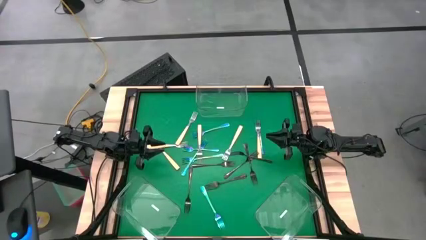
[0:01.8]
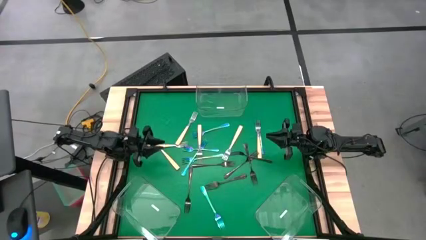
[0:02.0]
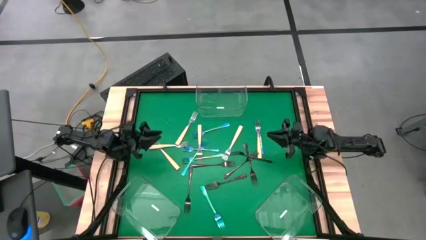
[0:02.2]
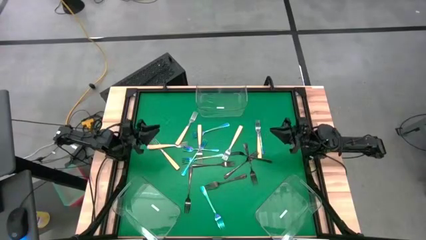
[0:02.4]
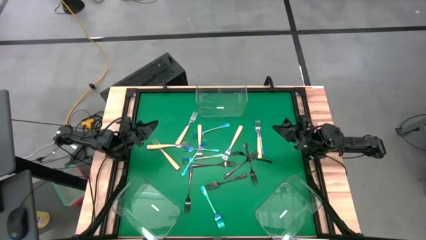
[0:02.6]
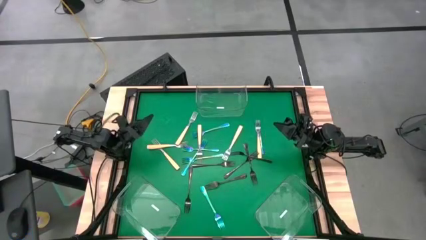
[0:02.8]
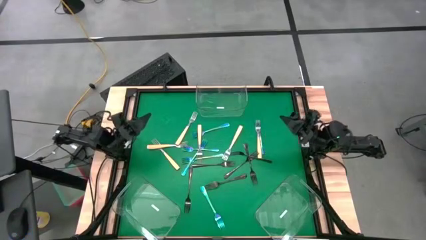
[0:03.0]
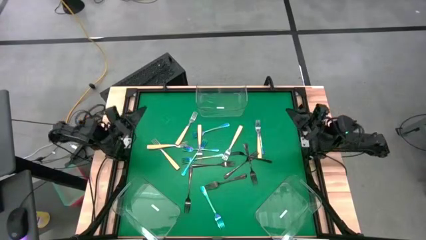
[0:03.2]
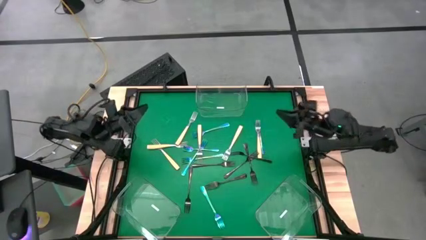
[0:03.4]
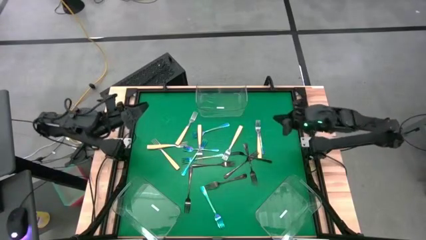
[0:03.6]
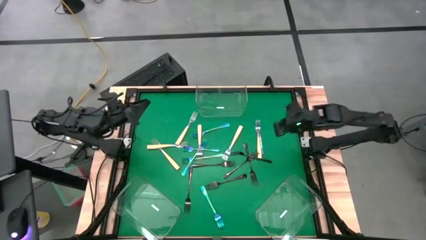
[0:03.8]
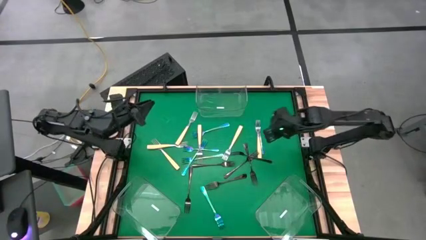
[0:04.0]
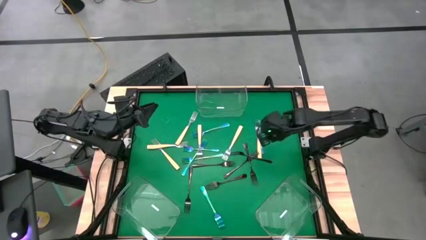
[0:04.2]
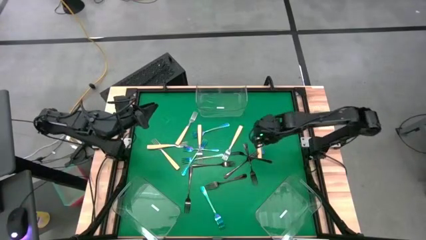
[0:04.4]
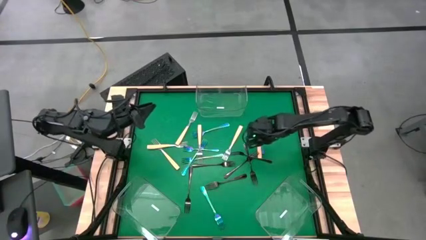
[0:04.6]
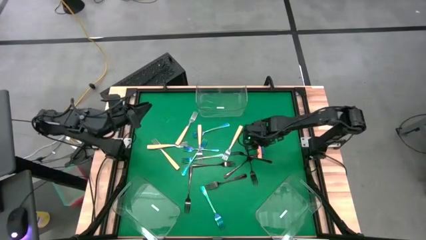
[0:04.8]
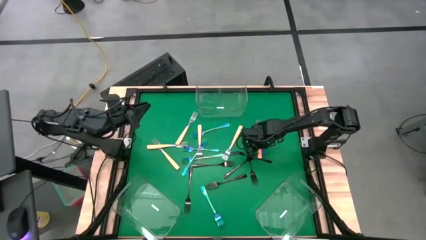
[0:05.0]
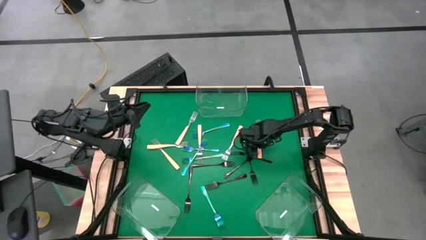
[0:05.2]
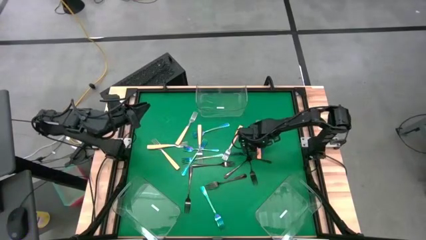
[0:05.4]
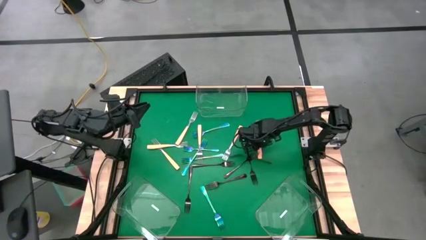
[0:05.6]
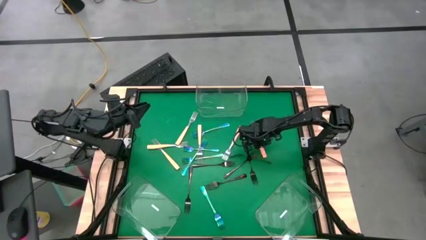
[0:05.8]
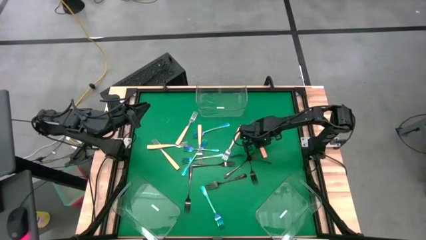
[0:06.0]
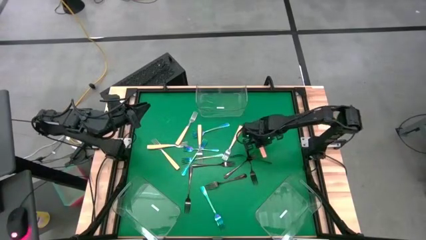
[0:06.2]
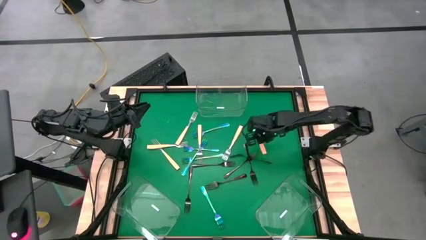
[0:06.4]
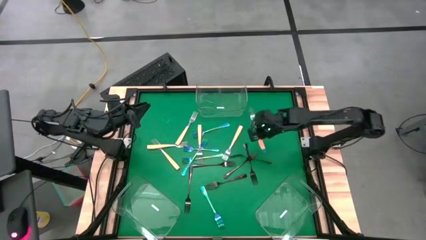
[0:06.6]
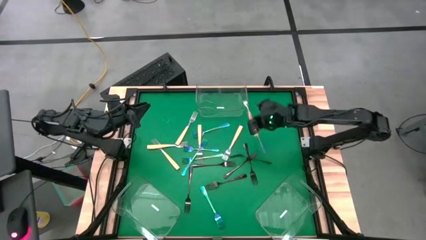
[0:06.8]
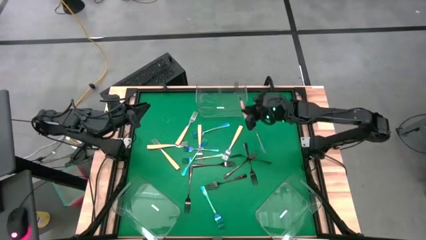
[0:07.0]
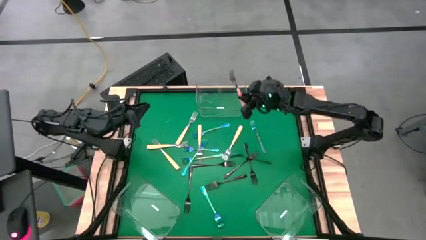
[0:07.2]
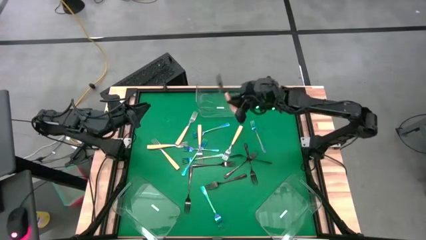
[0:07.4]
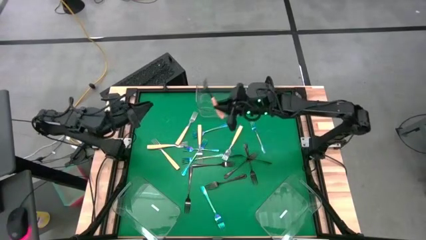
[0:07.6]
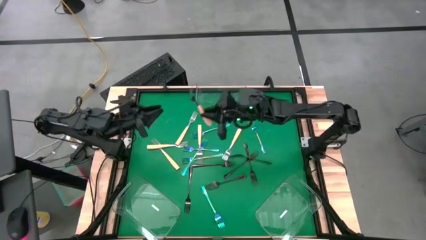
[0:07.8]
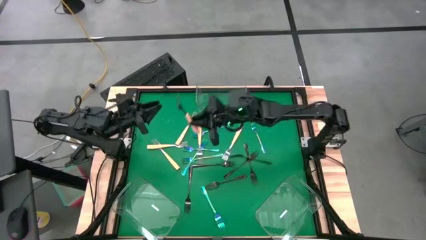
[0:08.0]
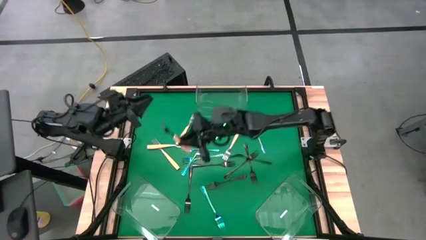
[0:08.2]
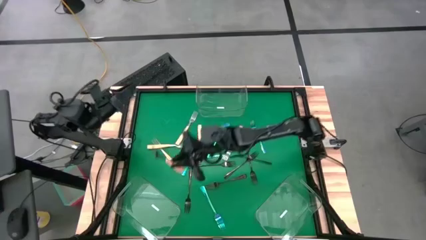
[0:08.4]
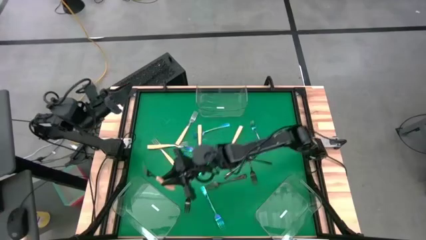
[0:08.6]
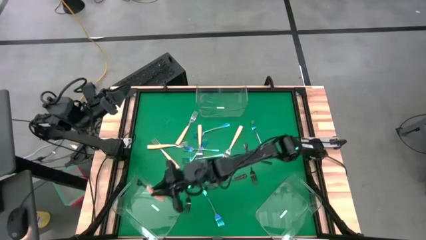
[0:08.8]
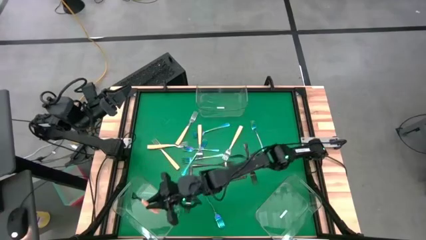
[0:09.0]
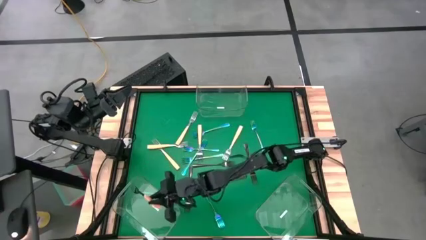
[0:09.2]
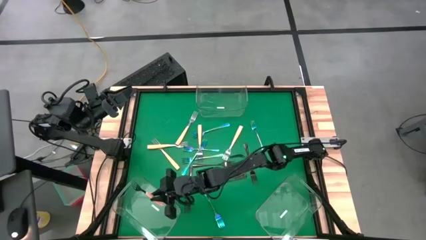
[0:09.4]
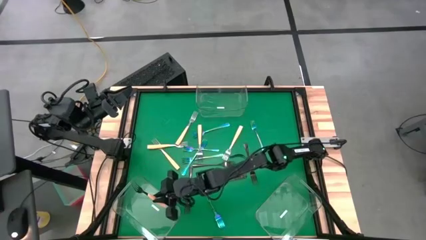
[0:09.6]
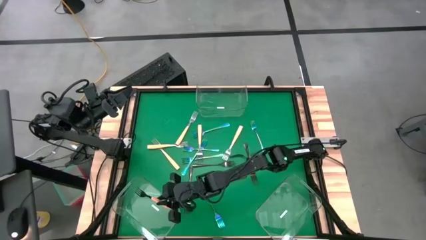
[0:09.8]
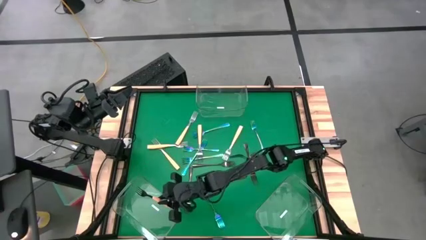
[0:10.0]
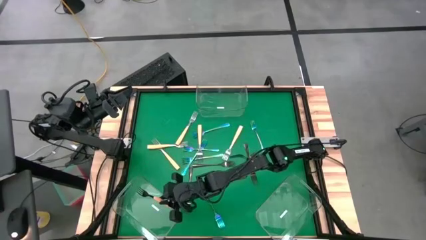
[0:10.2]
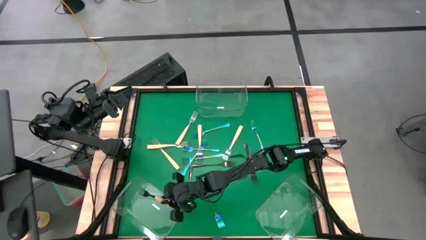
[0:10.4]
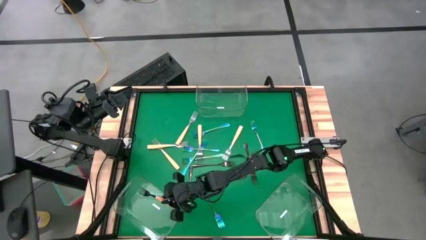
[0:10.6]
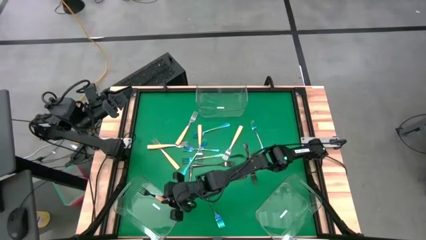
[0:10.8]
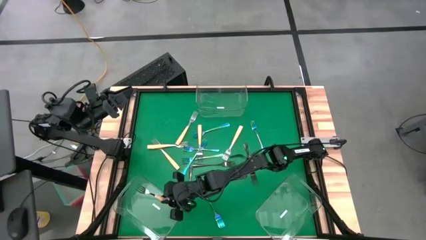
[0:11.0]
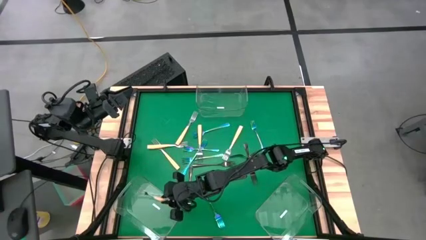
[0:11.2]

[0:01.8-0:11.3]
Task: Sort silverware by color (type)
Put the orange fork into the bottom left transparent bin

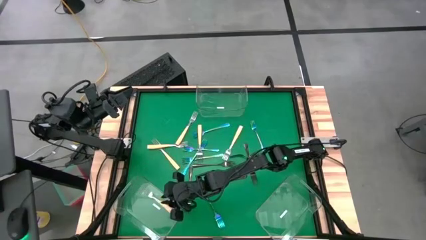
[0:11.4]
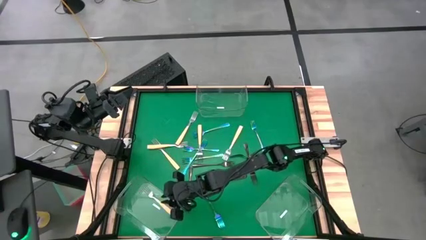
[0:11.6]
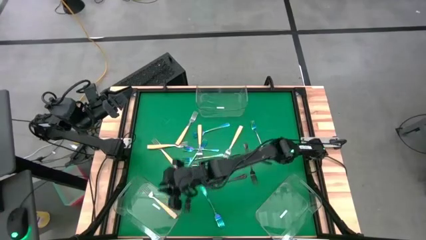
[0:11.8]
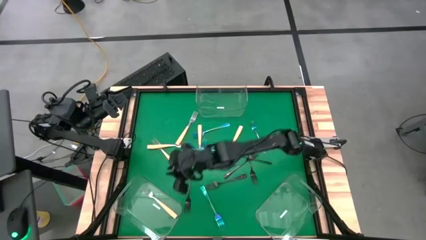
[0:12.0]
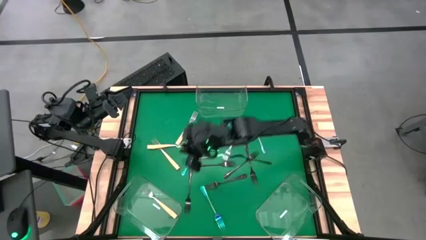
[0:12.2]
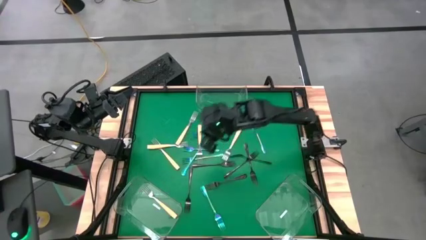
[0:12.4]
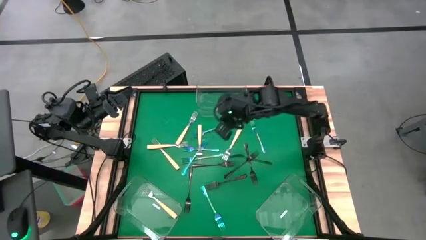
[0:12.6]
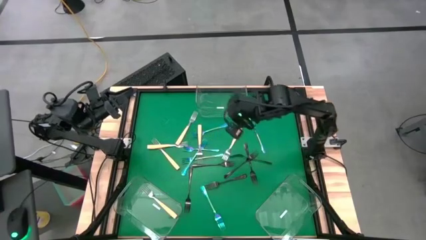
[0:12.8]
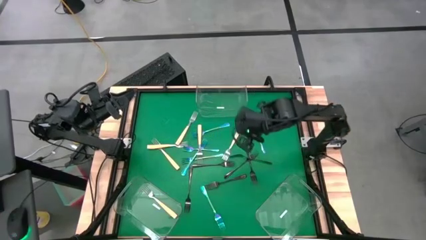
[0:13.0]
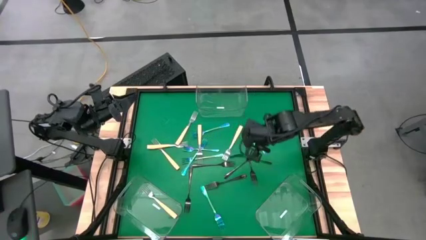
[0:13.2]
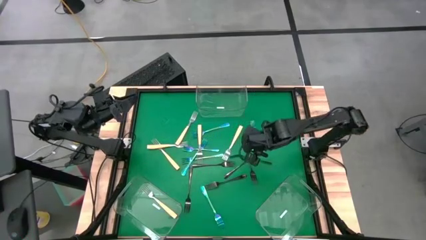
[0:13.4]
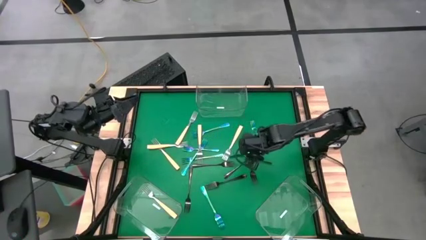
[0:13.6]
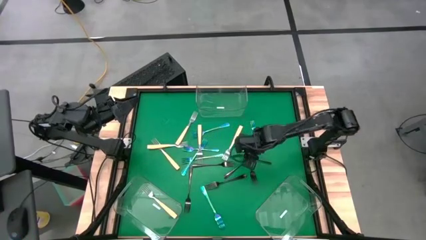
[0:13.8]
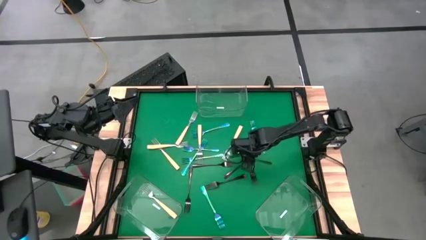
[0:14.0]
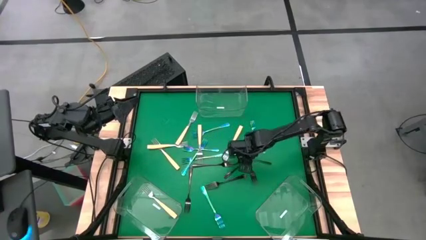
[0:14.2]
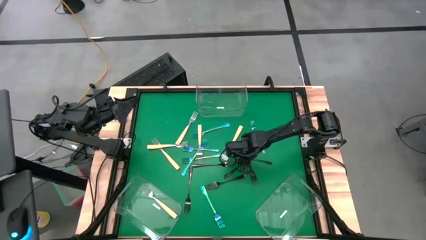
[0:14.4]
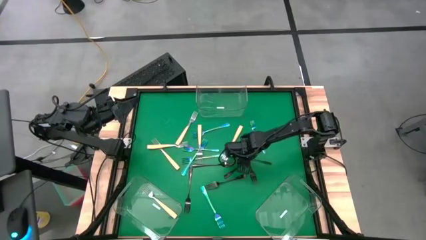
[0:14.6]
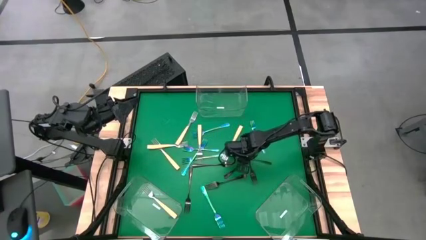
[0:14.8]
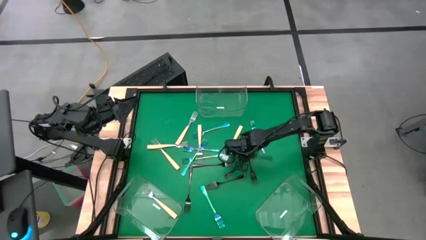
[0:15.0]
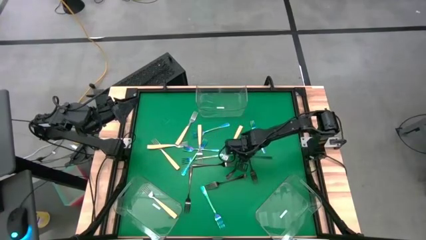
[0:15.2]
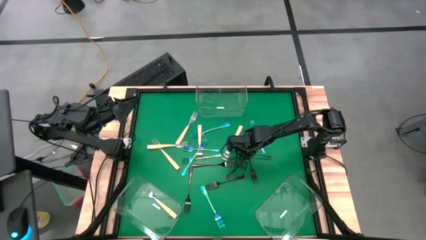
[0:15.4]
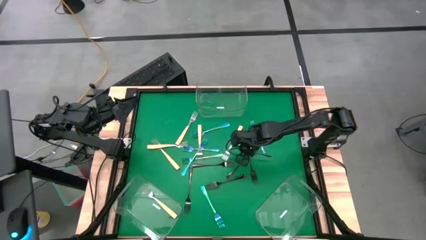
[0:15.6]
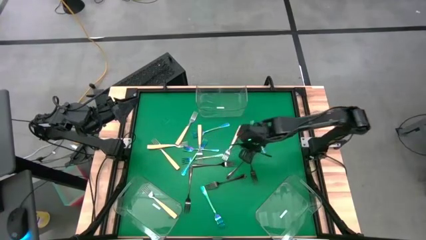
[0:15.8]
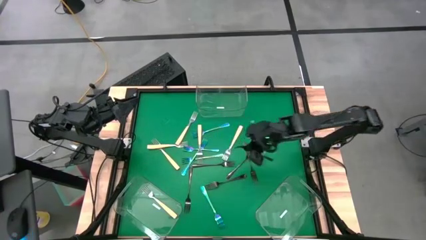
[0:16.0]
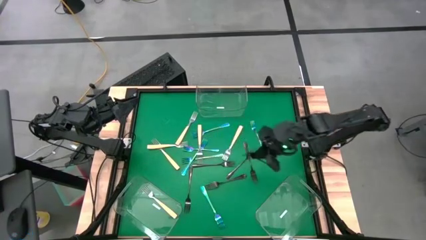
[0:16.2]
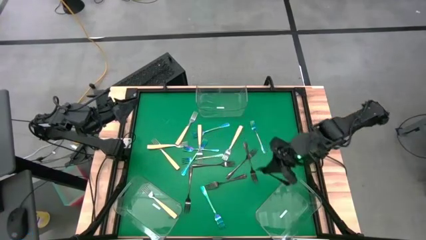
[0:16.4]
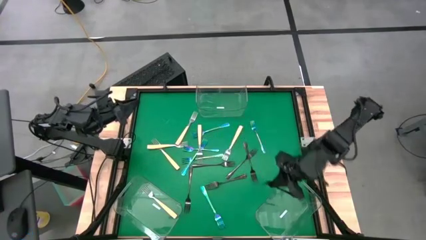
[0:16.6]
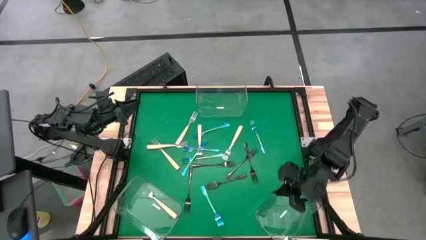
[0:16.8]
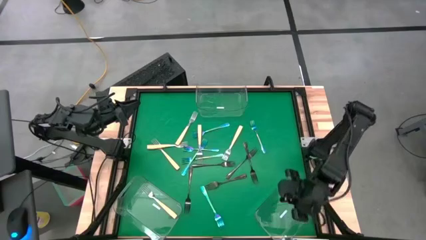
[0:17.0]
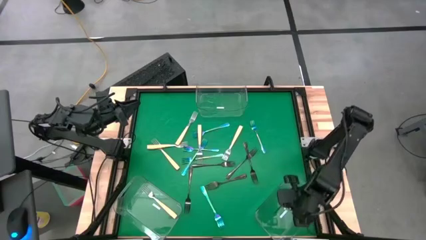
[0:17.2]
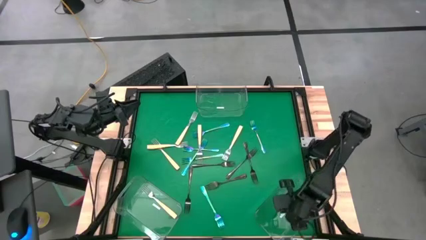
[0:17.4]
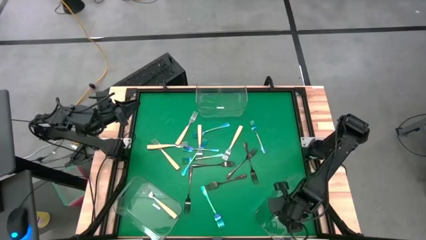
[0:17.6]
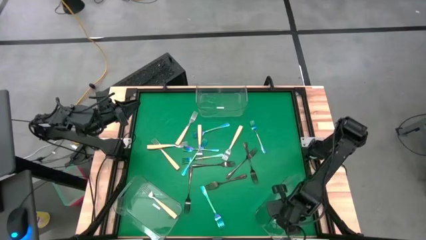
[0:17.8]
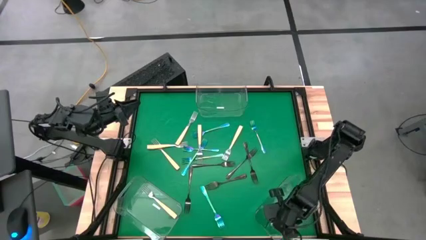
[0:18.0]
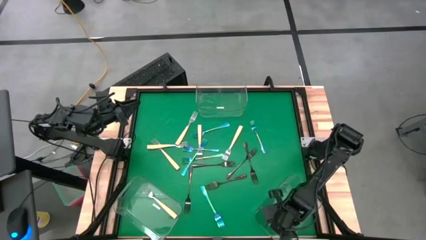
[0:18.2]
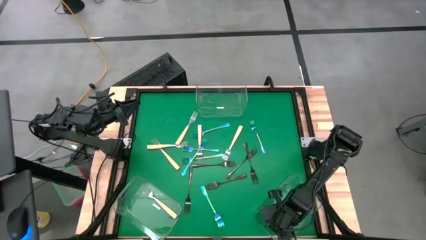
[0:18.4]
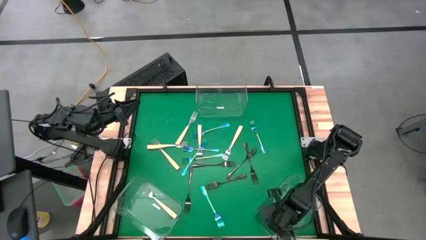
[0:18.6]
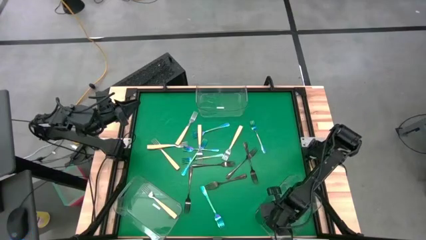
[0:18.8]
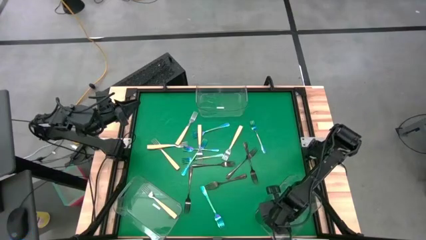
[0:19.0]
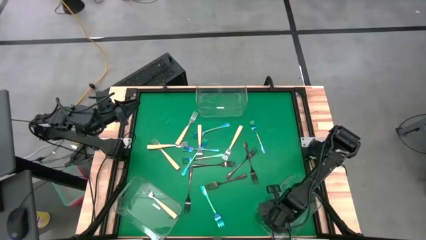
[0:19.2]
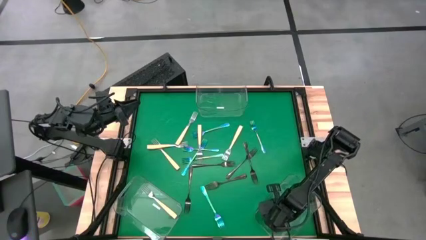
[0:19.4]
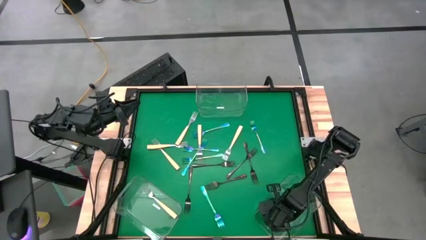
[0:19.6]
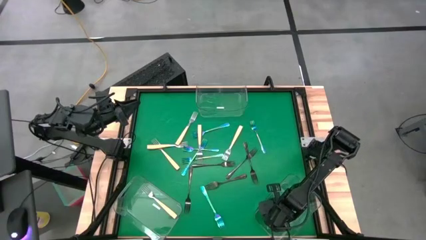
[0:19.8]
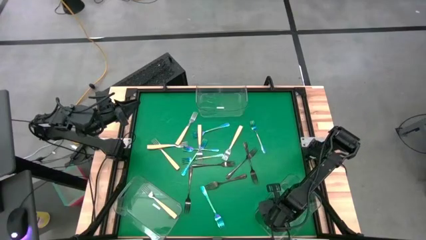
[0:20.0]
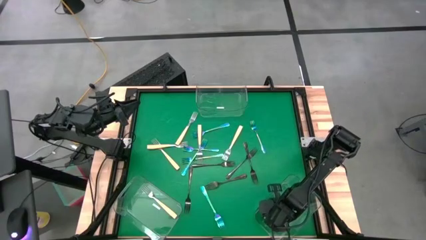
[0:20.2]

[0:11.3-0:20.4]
Put the black fork into the bottom right transparent bin
